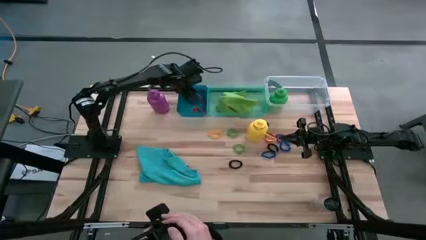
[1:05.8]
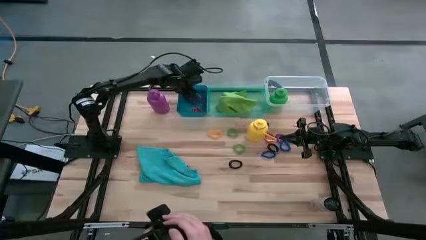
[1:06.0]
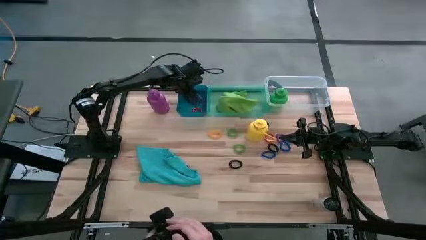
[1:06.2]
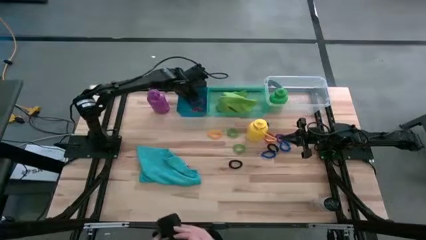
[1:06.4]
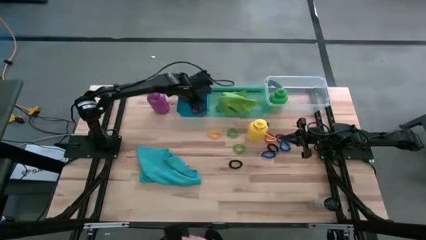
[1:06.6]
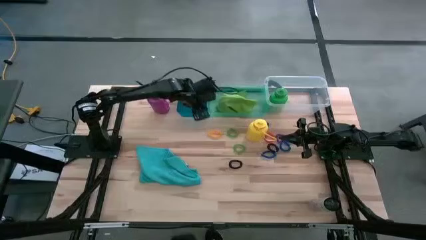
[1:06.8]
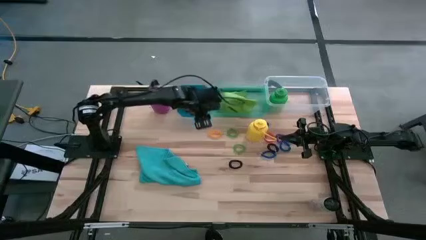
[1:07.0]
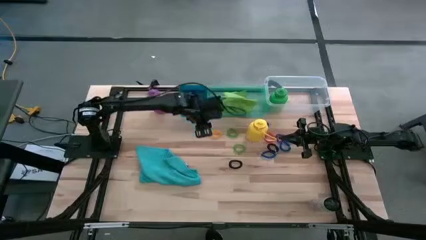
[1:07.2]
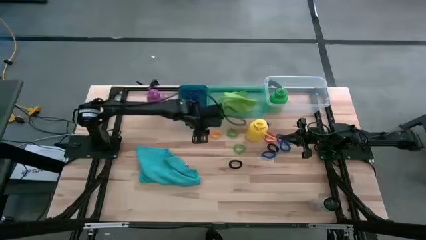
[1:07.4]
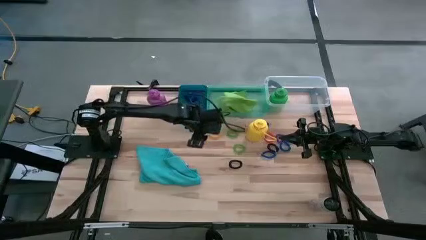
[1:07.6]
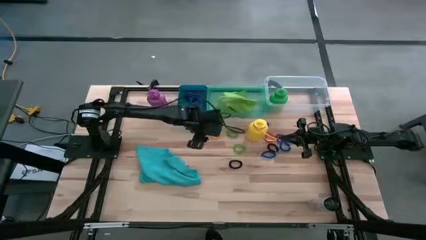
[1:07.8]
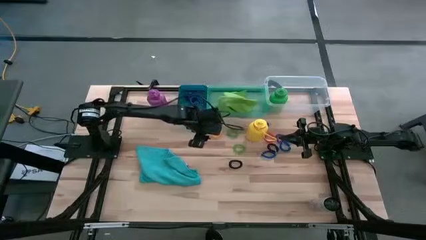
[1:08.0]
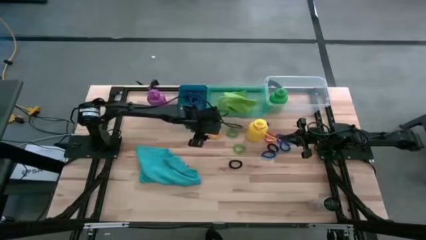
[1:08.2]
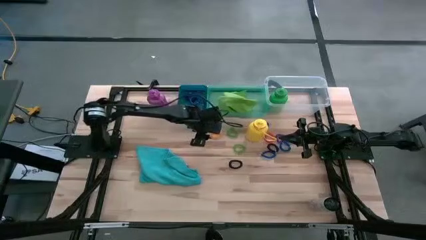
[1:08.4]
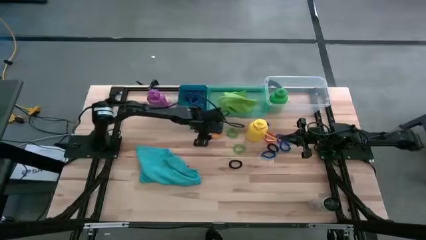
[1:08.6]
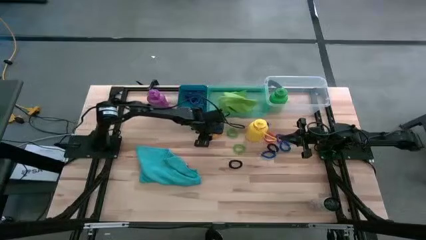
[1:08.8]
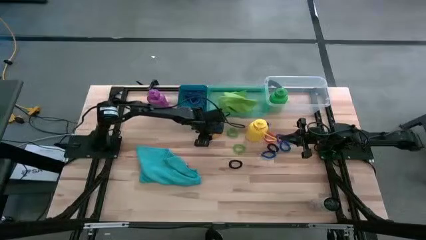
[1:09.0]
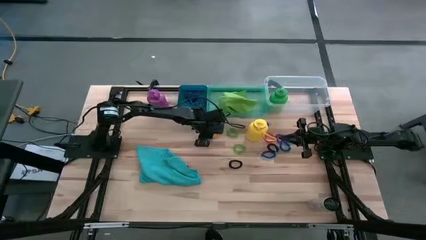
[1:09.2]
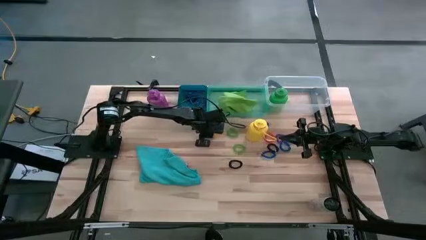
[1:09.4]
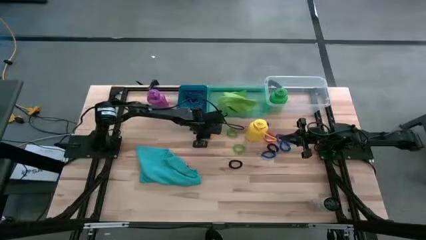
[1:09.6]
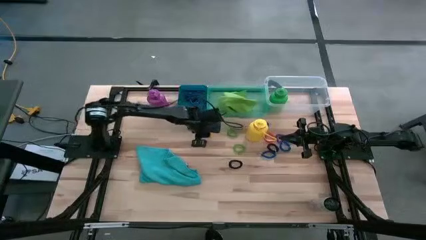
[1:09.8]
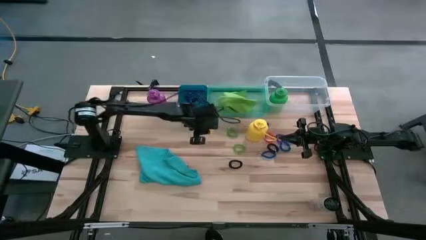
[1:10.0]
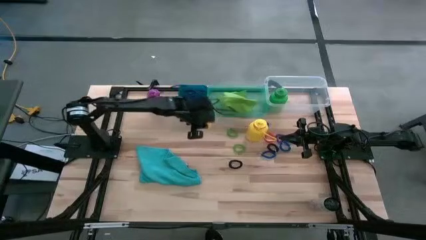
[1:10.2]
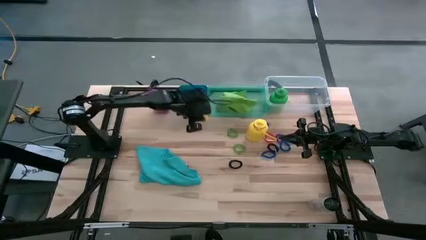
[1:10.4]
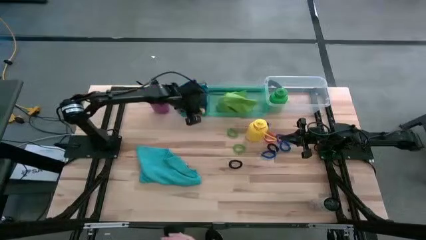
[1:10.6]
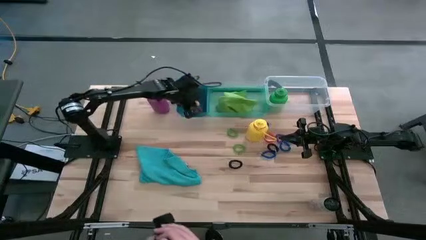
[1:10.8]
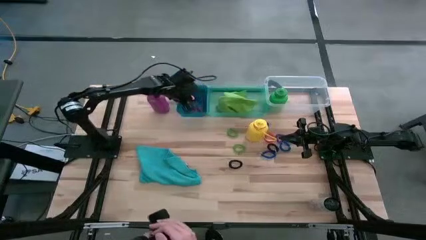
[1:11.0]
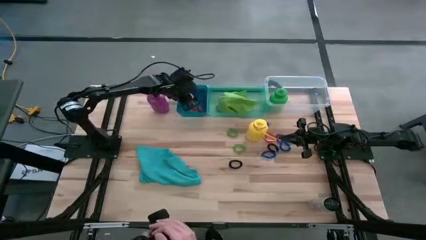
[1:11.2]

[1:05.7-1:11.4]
Task: Pick & Place Sports Items
Put the orange spring keychain into the blue bin

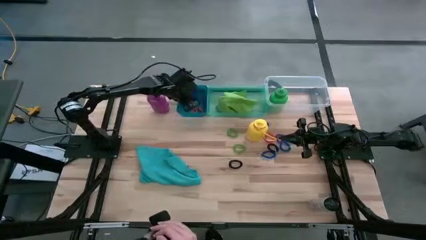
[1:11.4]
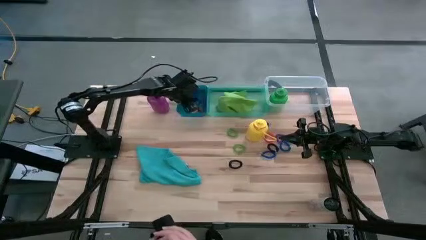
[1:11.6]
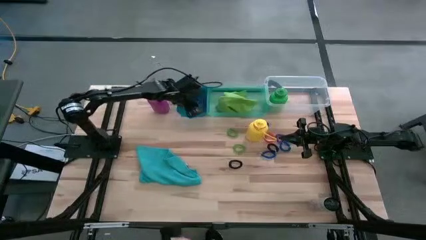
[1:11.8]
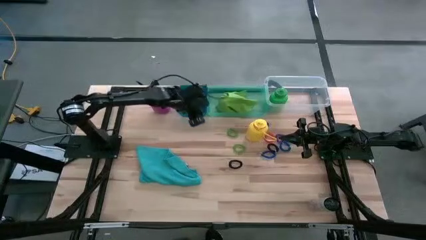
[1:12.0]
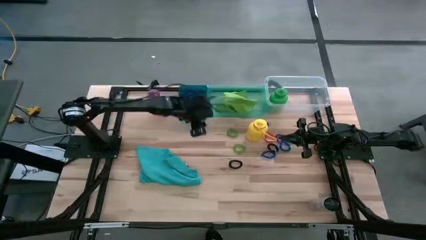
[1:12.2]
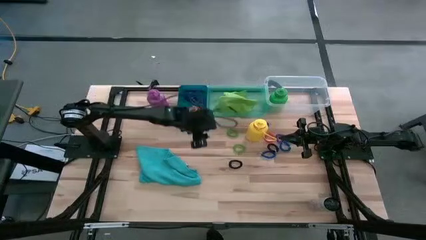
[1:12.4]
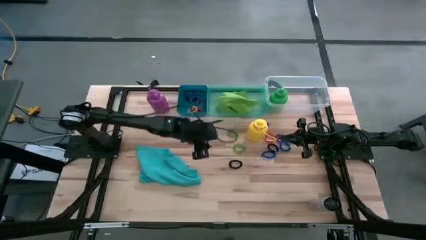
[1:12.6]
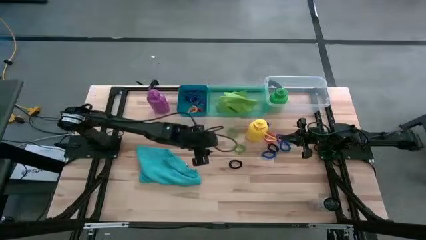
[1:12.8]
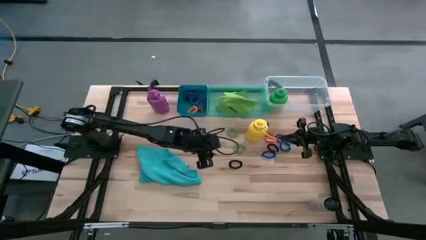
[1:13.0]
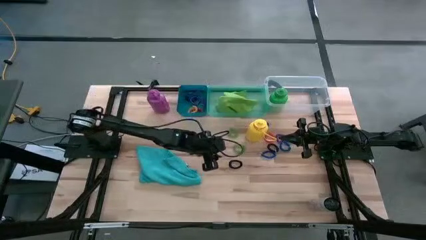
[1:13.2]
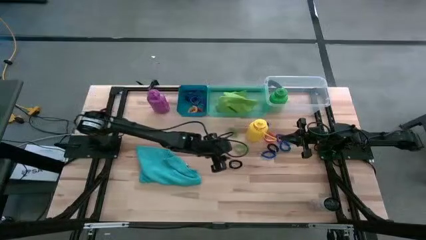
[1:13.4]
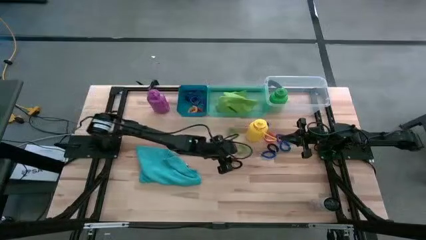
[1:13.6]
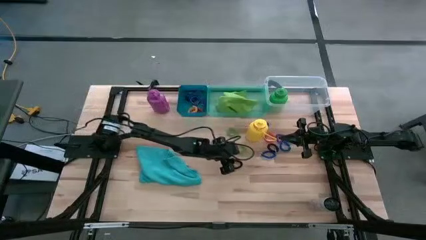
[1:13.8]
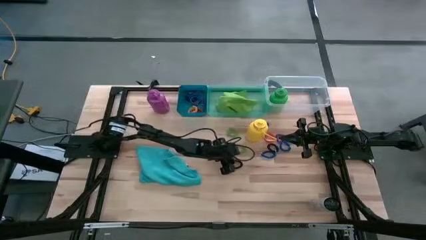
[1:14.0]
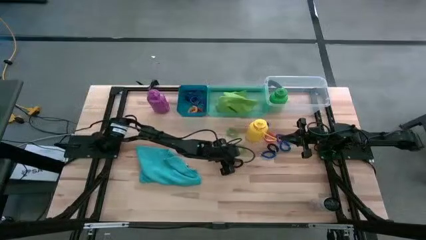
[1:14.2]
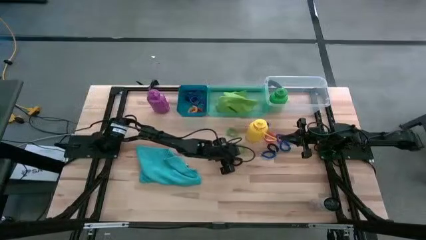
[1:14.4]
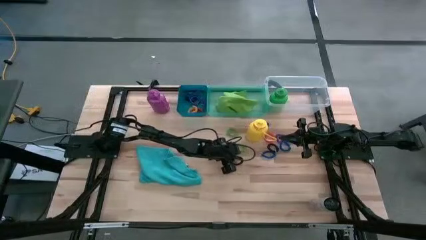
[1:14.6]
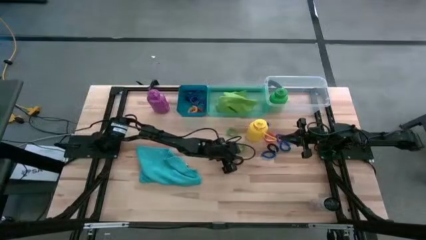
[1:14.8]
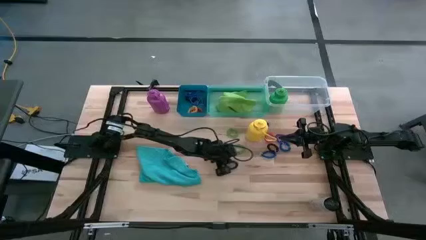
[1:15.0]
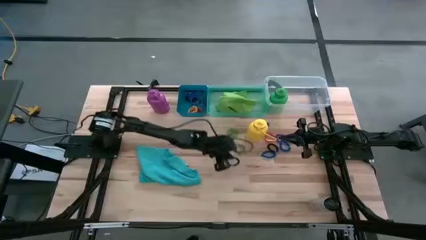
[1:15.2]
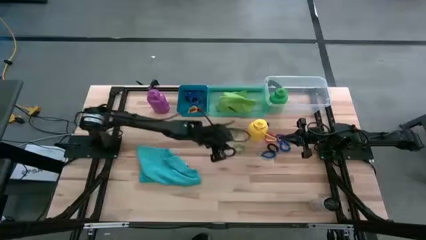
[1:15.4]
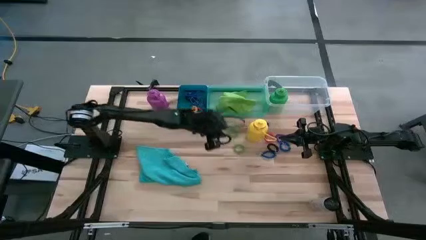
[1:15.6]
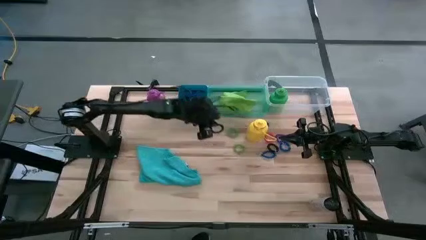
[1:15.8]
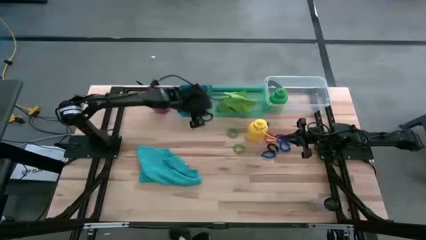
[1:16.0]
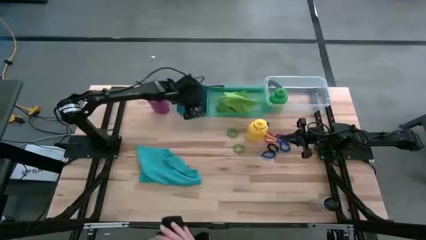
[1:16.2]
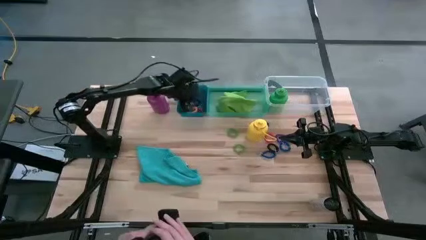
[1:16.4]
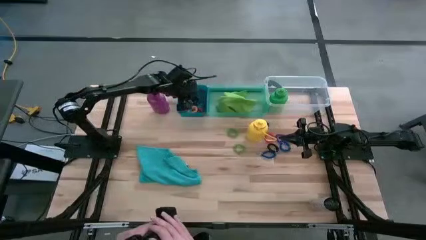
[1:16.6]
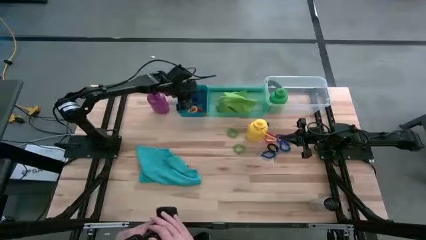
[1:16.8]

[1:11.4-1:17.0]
Put the left black spring keychain into the blue bin

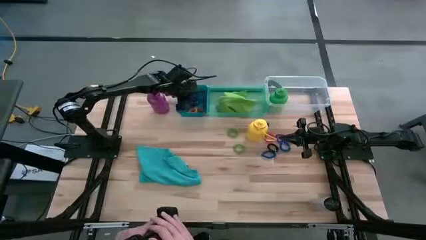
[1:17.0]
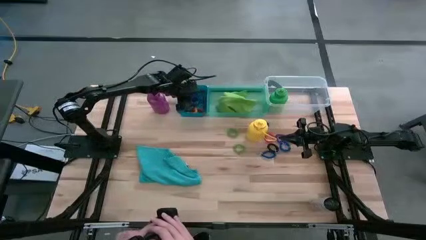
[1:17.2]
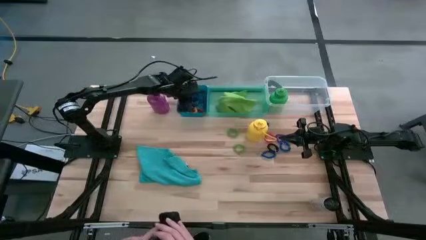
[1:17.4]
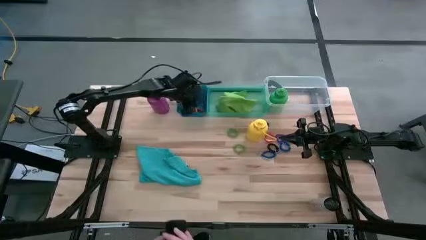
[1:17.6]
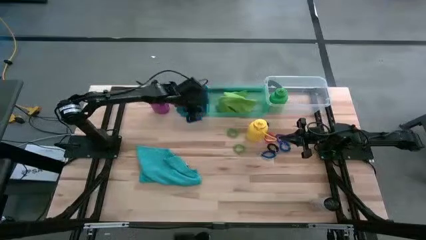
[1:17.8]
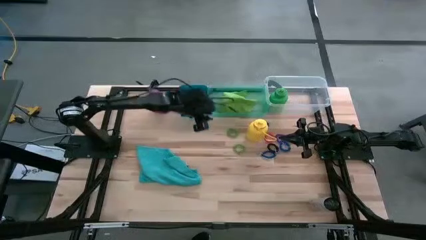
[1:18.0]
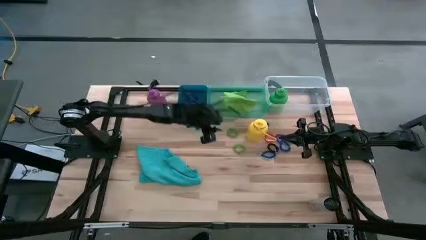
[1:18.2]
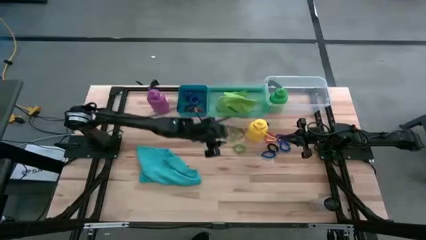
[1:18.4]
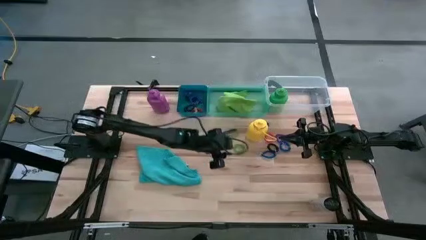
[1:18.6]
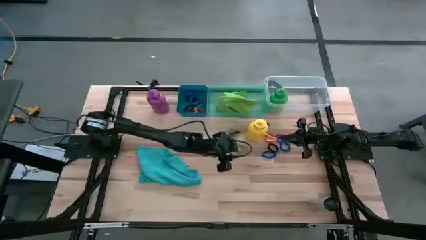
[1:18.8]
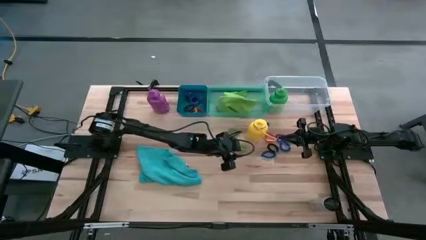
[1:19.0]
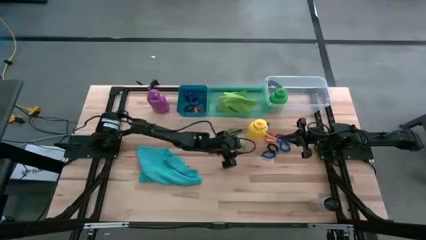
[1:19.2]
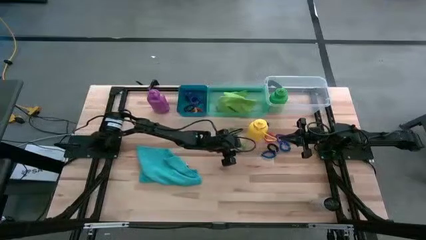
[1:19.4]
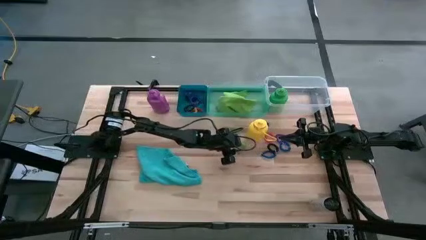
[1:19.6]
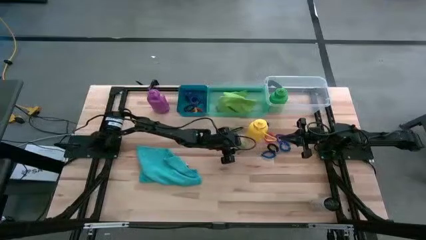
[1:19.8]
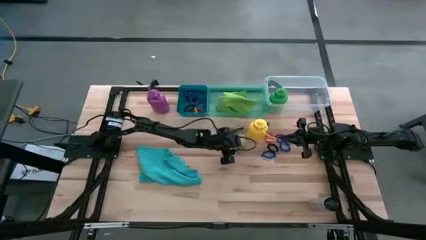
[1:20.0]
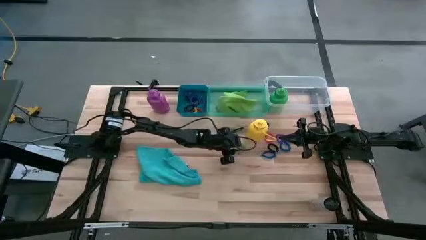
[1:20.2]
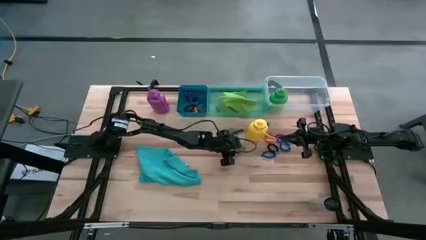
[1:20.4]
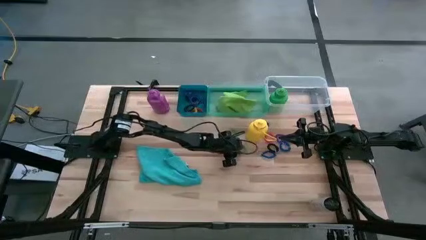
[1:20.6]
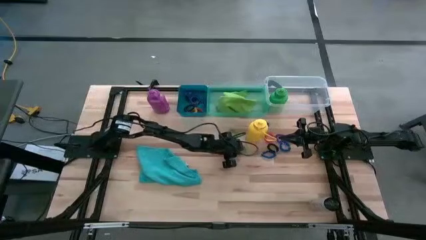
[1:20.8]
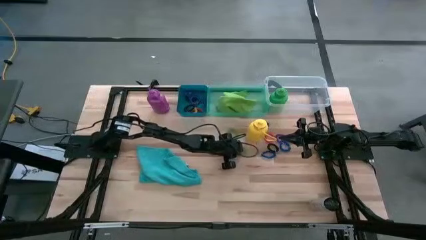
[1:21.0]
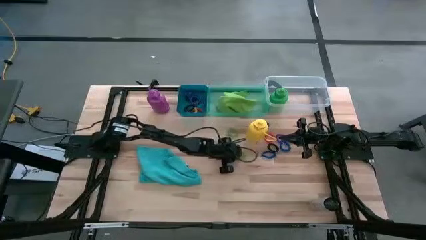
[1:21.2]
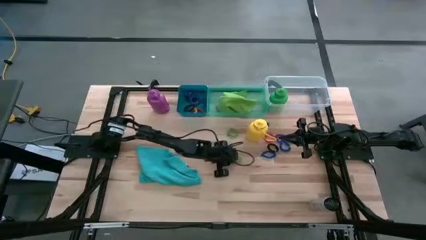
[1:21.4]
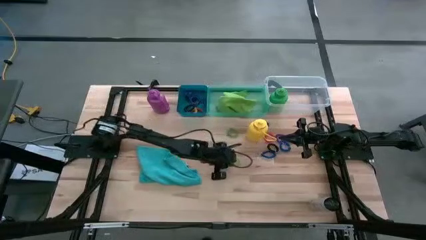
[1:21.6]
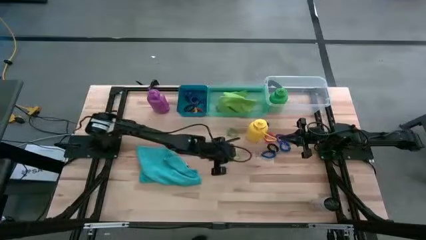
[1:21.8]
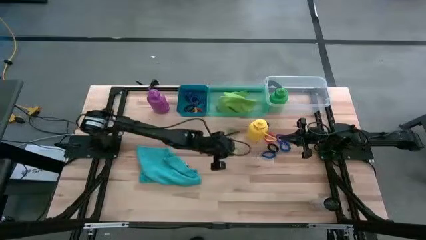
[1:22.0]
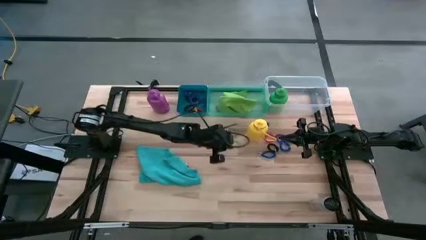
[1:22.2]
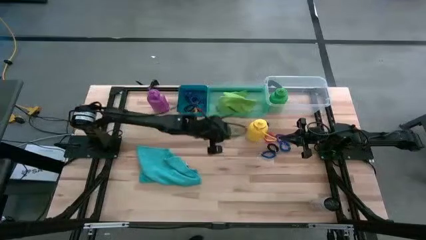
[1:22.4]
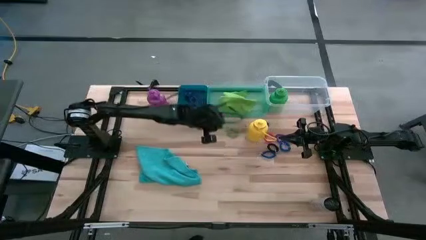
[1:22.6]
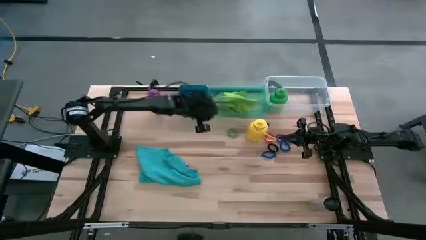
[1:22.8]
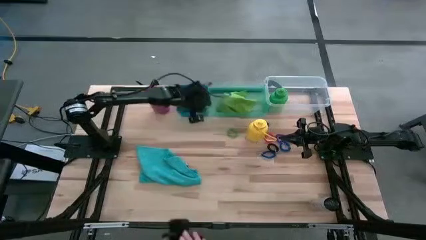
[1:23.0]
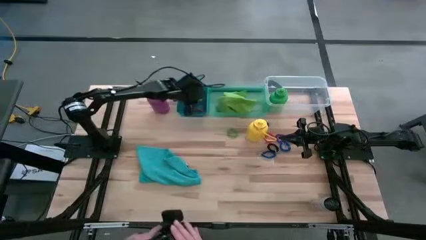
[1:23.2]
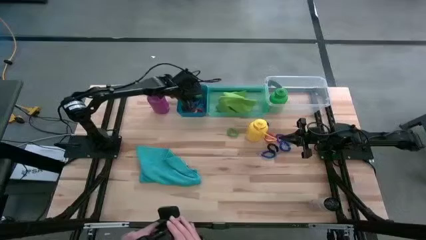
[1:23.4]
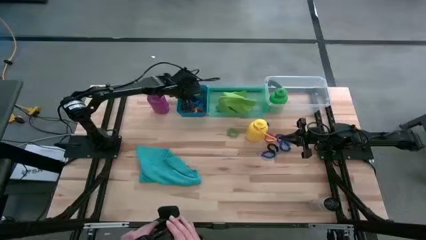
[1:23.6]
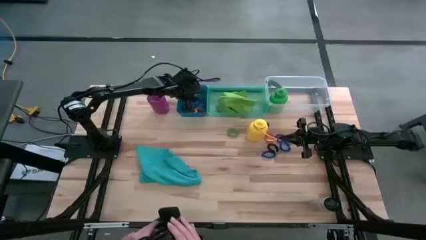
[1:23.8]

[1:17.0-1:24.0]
Put the bottom green spring keychain into the blue bin
